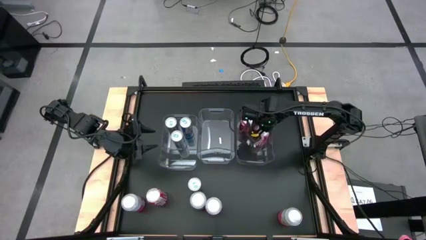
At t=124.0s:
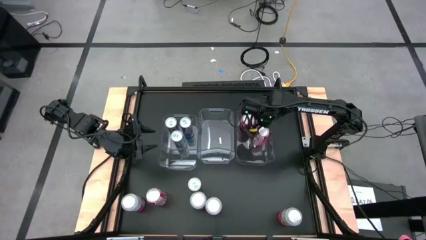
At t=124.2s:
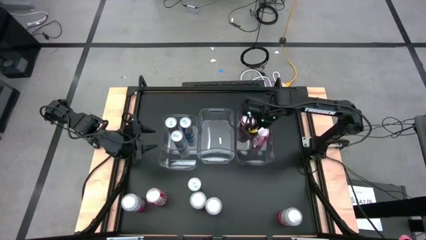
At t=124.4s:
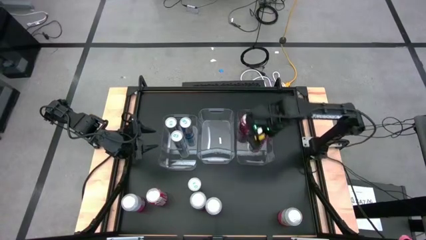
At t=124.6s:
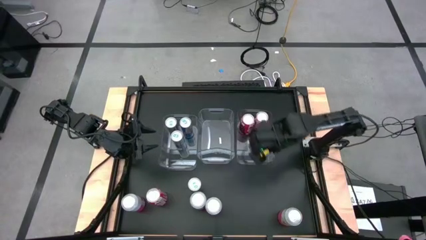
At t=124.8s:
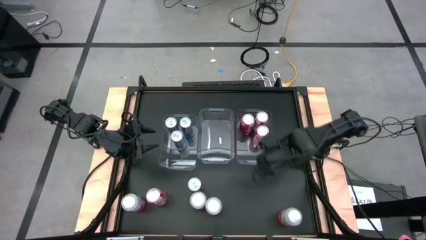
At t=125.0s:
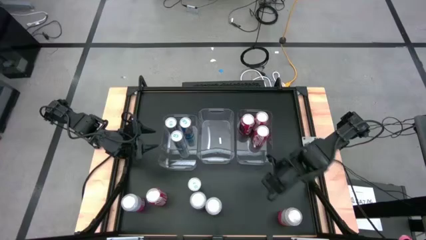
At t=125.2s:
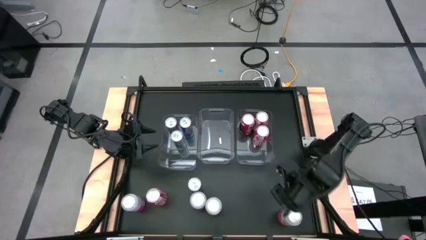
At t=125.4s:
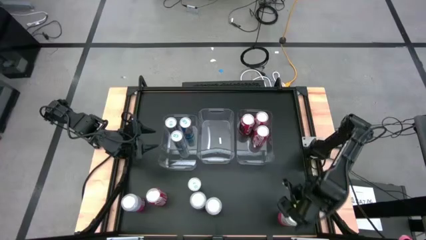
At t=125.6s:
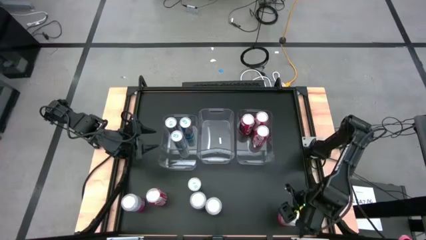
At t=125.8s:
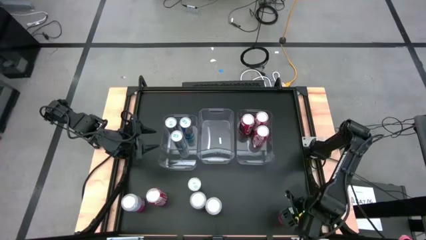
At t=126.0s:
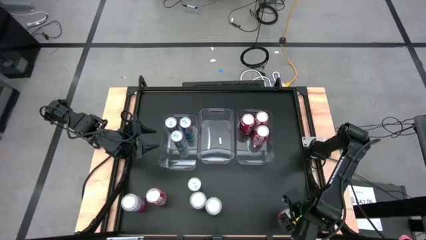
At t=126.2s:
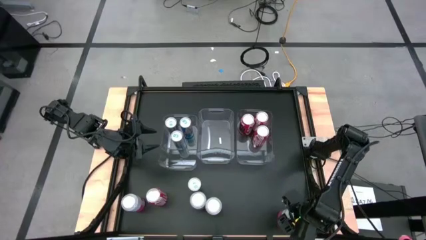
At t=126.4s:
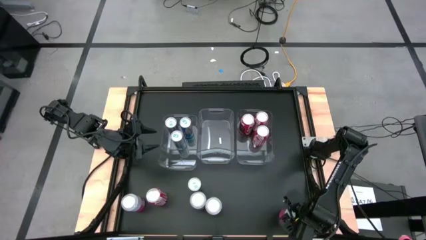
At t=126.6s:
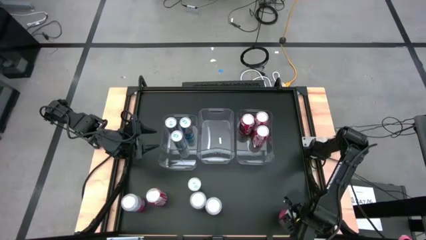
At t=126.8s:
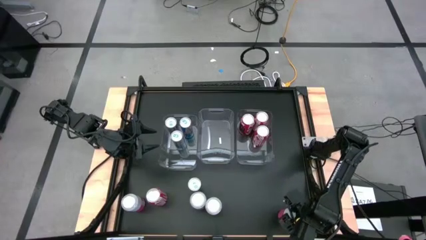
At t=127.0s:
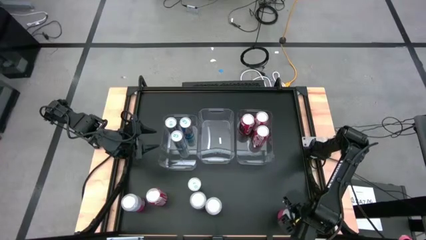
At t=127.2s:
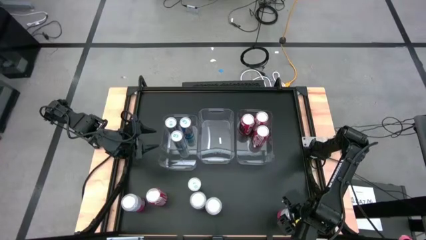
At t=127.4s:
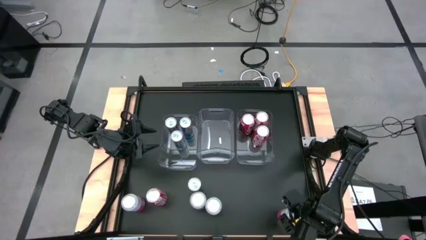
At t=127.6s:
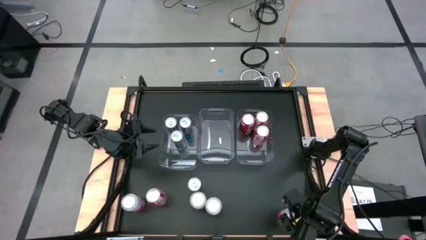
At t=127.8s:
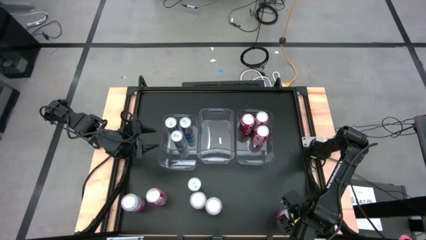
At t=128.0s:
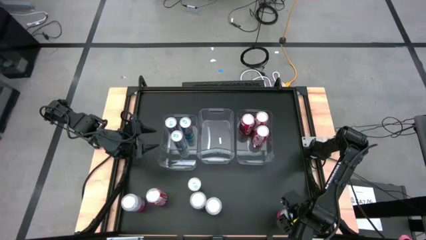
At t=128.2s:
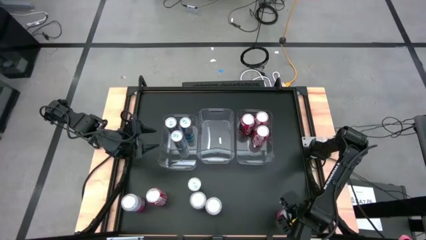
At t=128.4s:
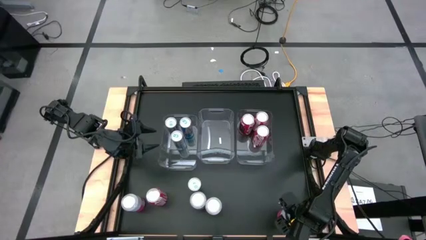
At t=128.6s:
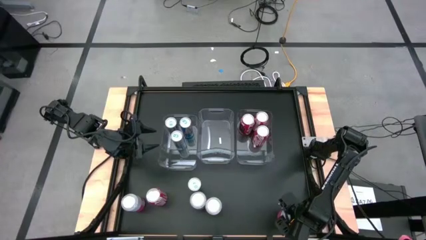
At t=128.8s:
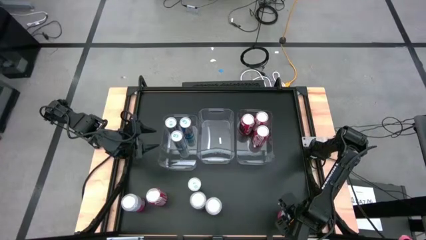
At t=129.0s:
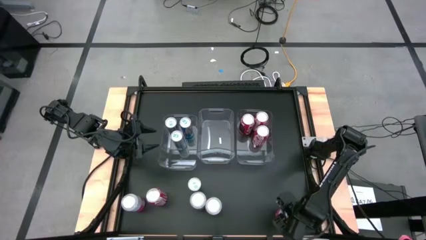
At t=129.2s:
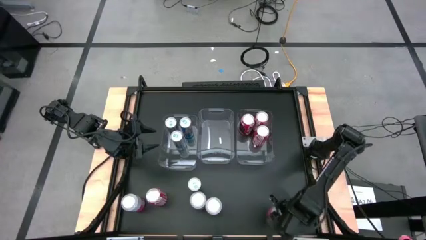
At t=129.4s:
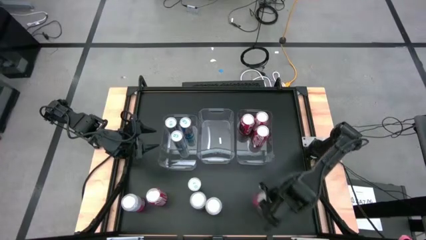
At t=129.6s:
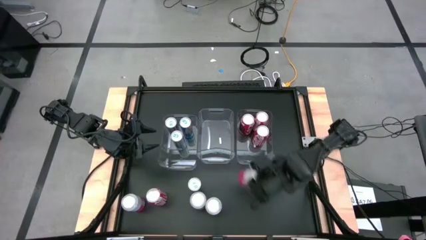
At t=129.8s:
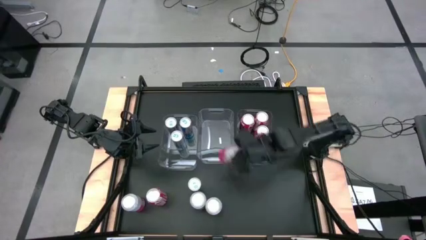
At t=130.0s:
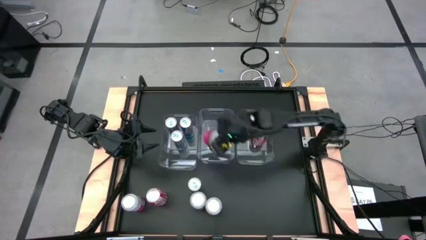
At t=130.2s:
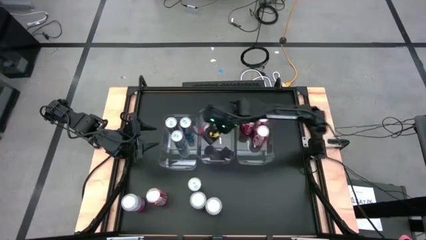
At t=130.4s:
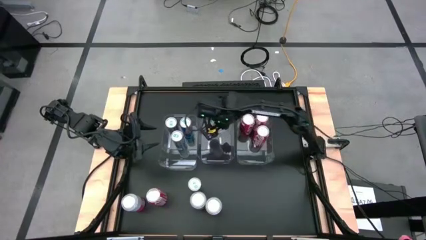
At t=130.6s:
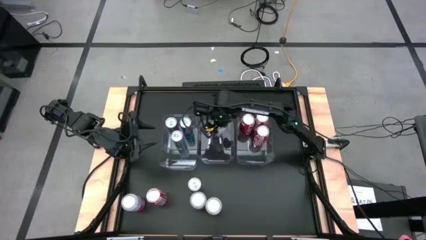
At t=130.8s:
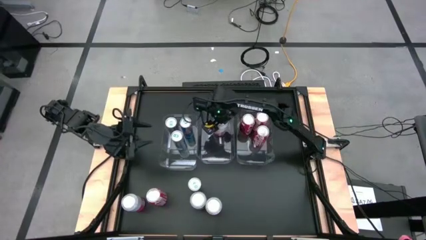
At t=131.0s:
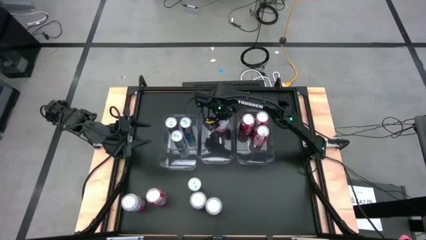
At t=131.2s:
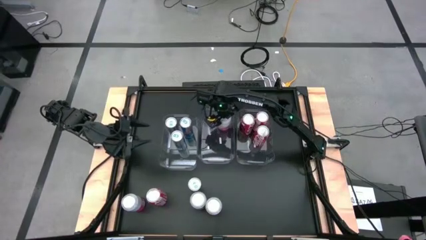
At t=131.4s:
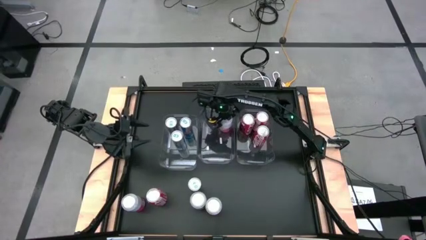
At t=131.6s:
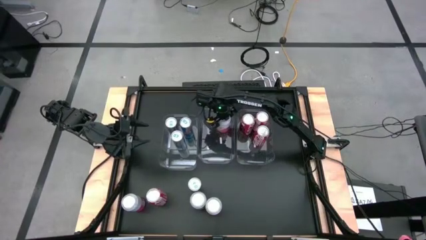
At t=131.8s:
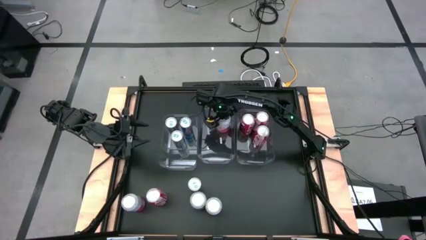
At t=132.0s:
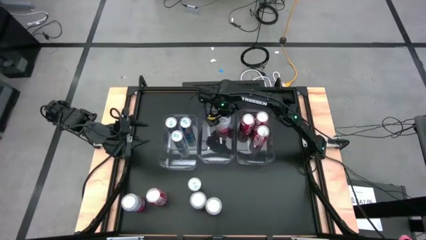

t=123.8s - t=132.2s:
Task: Sort soda cans
Put the bottom right red and white soda can into the middle transparent bin

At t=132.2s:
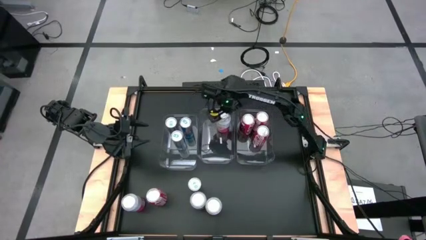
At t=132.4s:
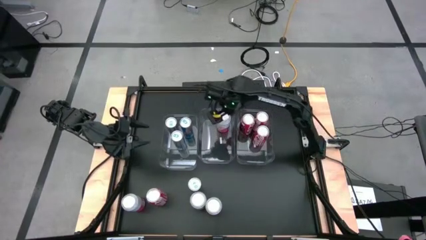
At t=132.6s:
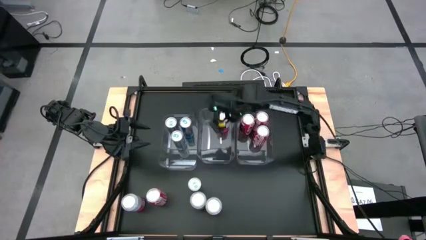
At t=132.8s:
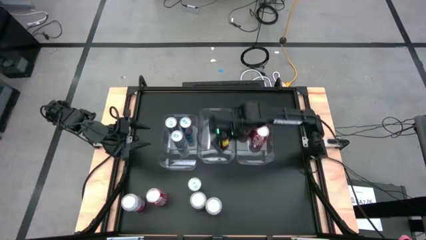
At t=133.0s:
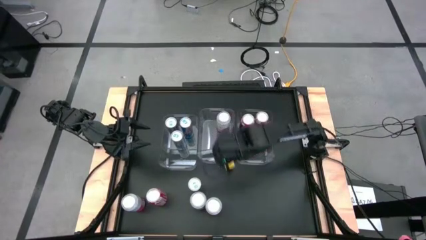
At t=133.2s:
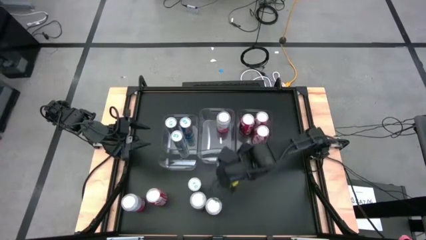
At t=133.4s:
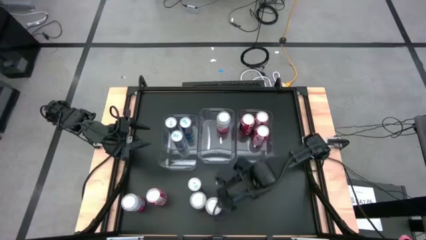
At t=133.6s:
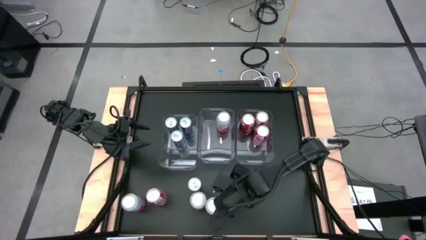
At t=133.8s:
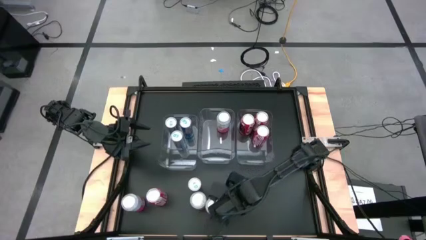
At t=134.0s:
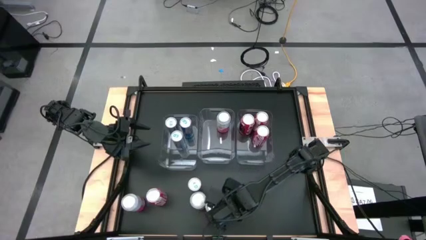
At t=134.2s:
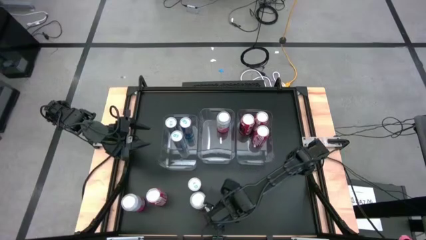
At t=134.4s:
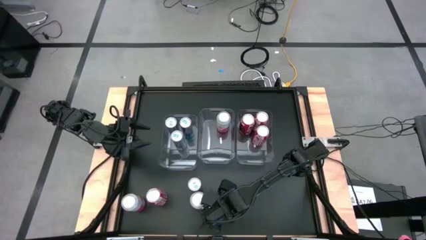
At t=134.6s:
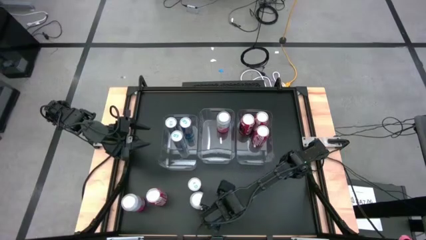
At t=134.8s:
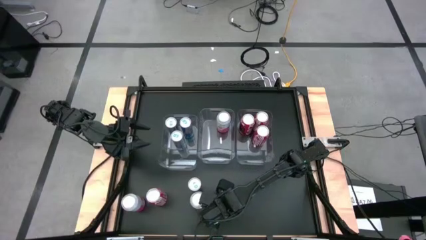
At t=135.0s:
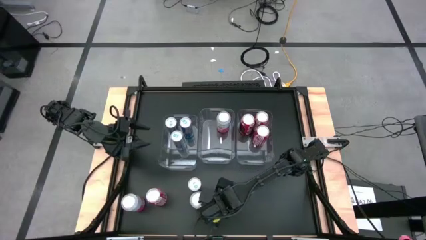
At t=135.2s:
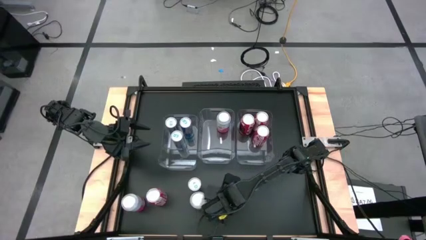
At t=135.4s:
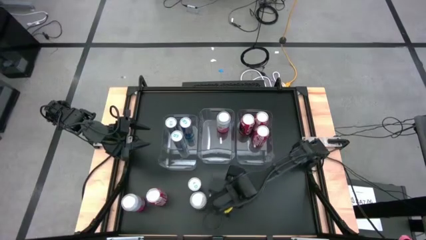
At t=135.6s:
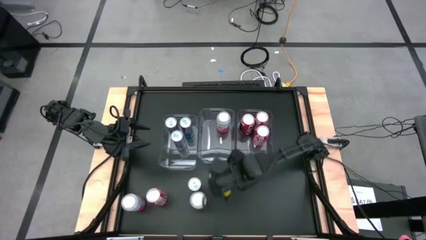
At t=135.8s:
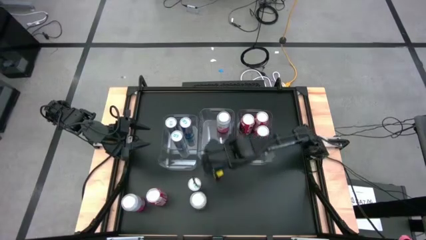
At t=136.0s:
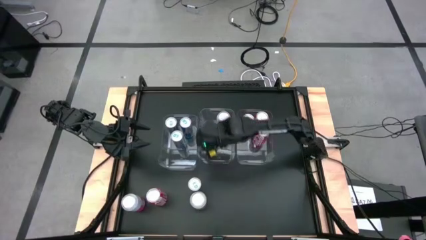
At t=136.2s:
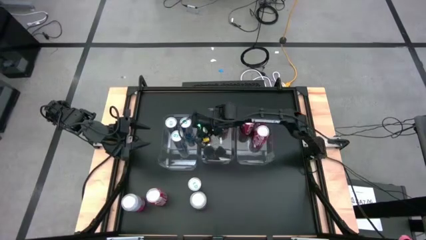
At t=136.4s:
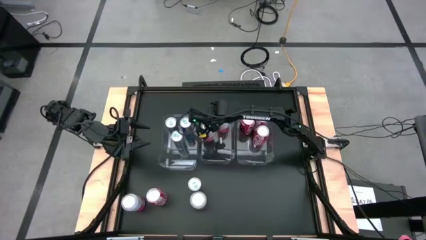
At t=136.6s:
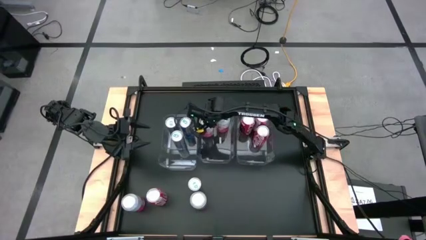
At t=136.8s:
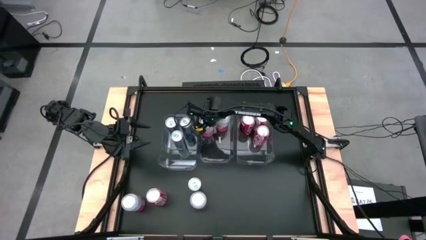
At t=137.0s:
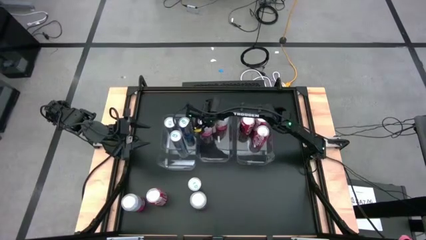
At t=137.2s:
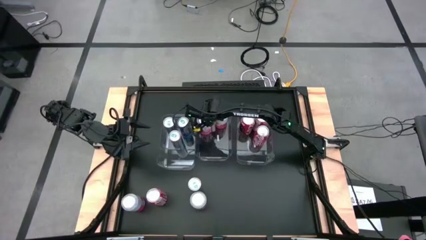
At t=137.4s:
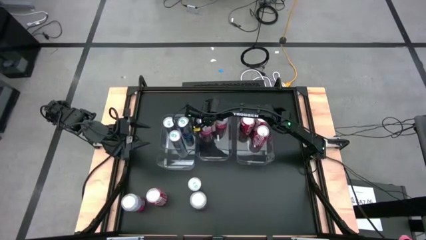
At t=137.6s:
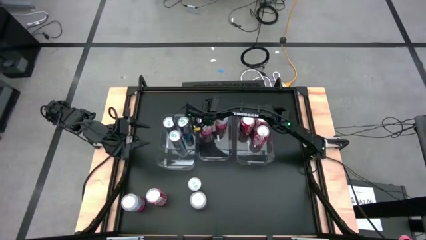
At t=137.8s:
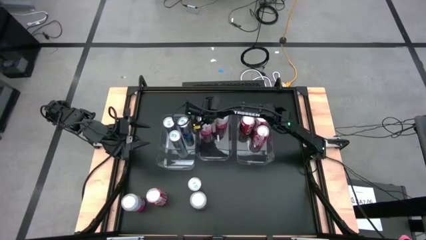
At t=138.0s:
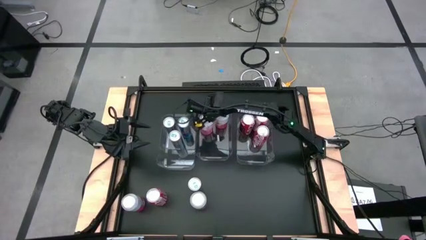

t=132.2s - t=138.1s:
Put the bottom center red and white soda can into the middle transparent bin
